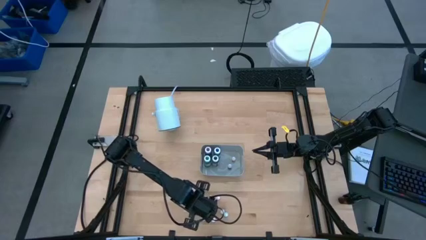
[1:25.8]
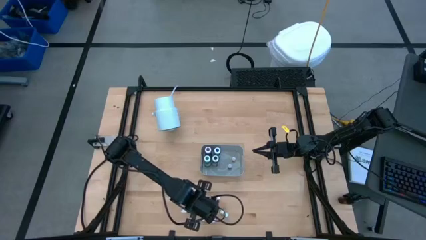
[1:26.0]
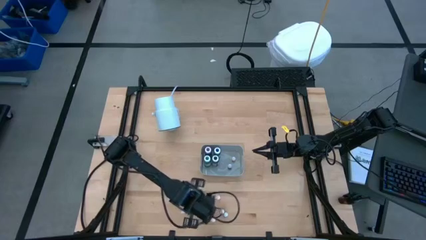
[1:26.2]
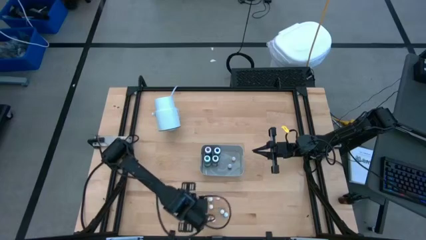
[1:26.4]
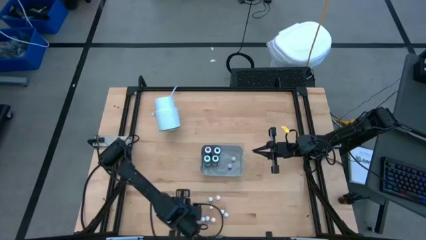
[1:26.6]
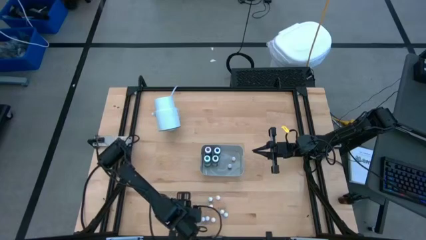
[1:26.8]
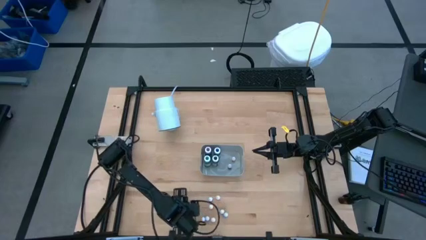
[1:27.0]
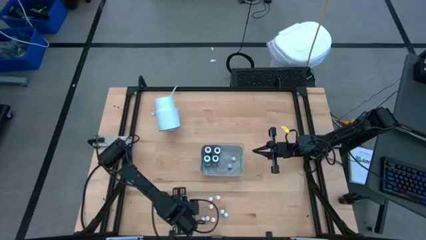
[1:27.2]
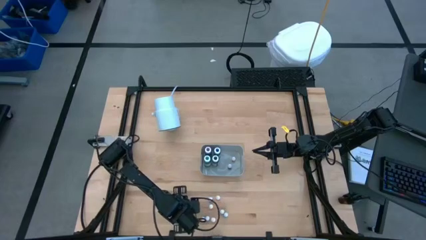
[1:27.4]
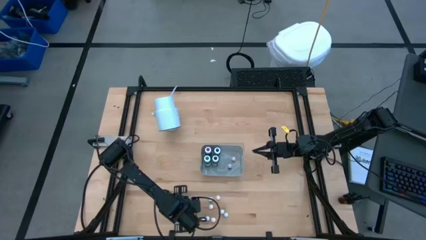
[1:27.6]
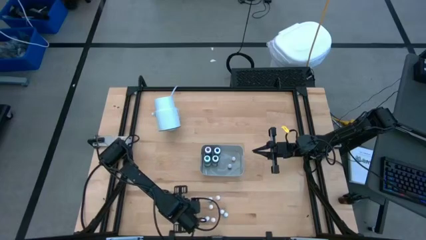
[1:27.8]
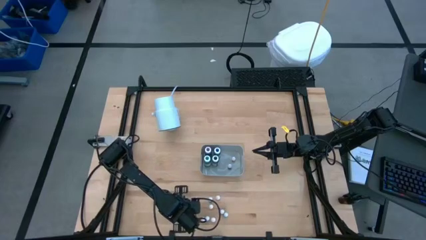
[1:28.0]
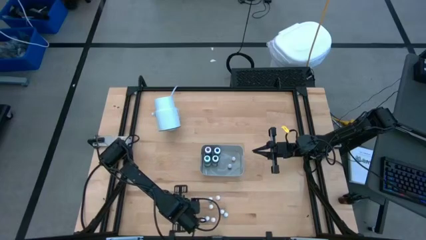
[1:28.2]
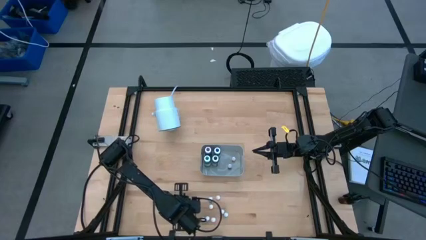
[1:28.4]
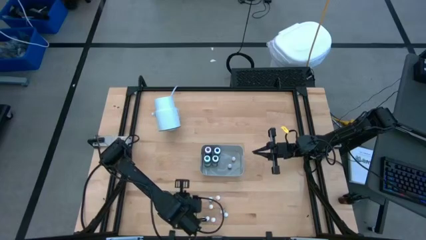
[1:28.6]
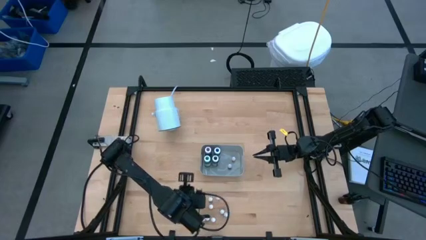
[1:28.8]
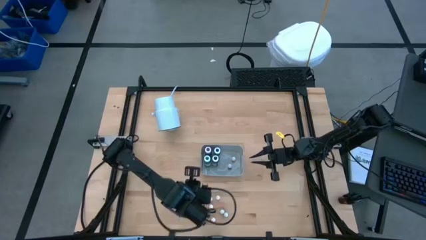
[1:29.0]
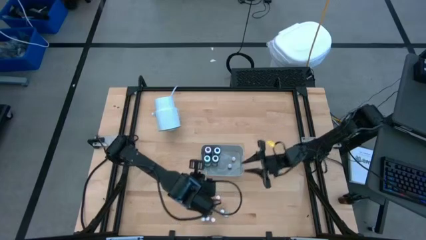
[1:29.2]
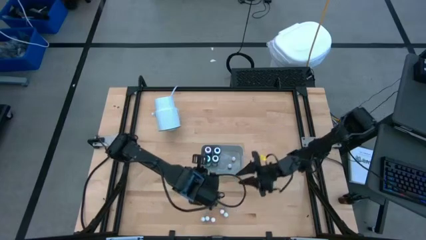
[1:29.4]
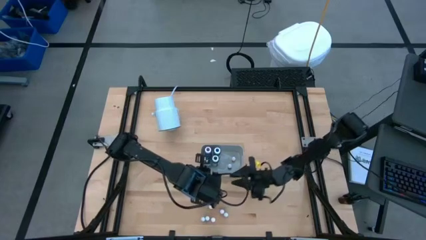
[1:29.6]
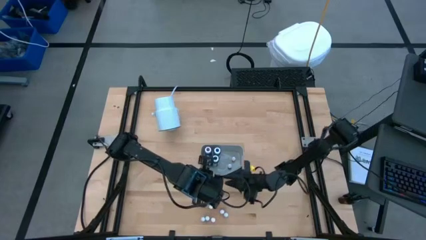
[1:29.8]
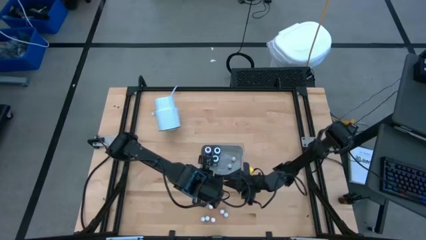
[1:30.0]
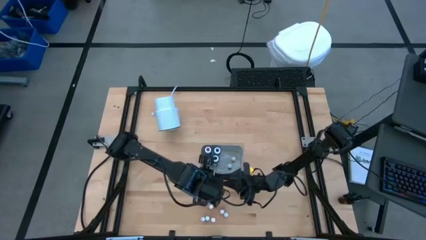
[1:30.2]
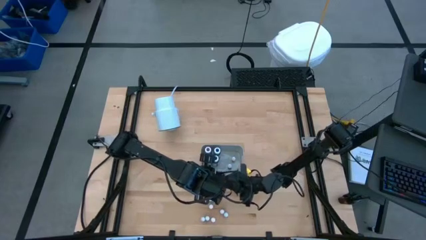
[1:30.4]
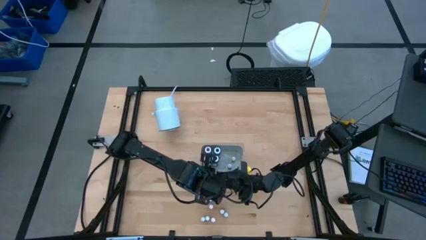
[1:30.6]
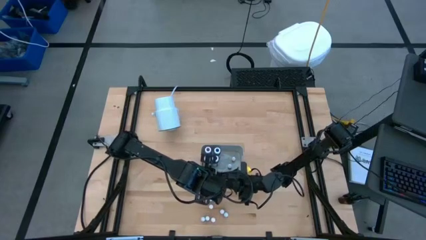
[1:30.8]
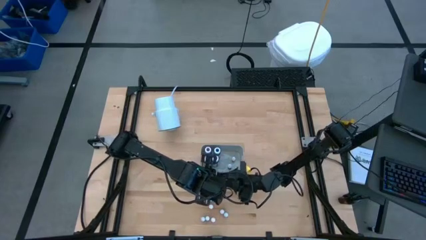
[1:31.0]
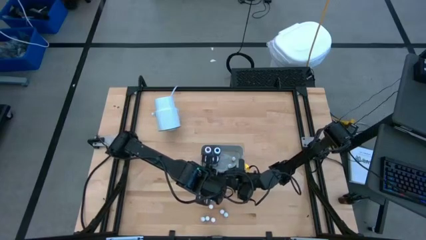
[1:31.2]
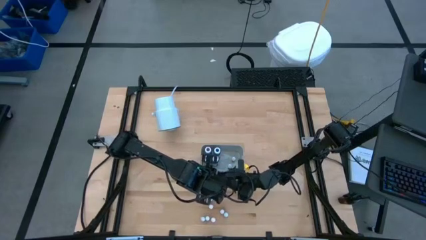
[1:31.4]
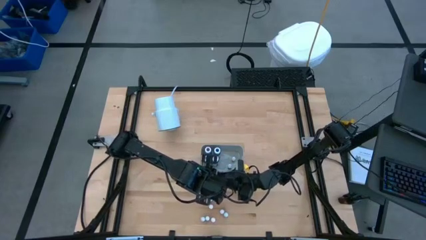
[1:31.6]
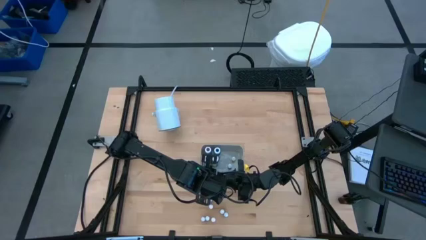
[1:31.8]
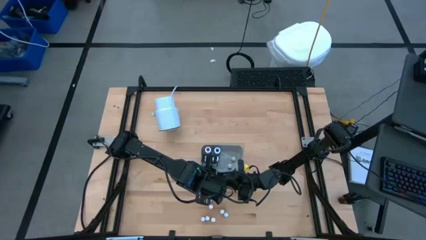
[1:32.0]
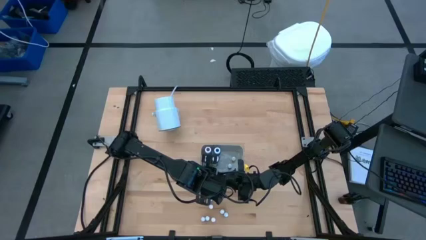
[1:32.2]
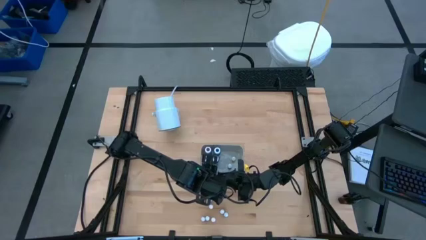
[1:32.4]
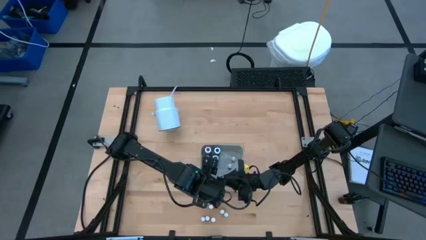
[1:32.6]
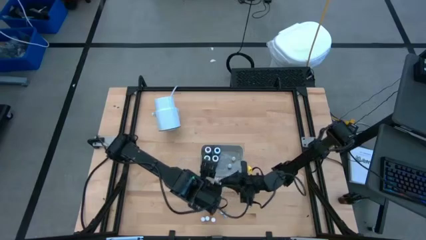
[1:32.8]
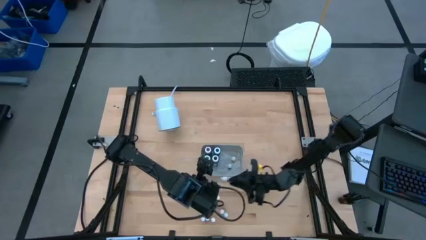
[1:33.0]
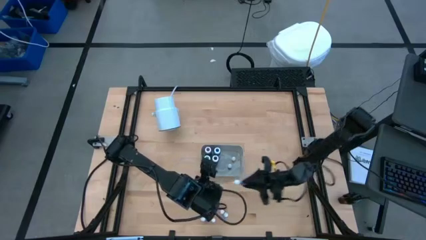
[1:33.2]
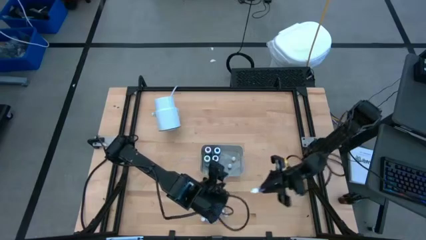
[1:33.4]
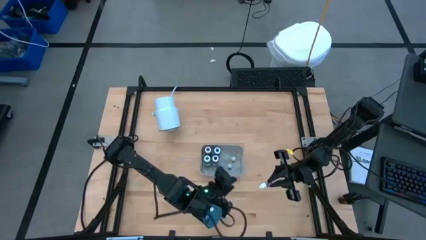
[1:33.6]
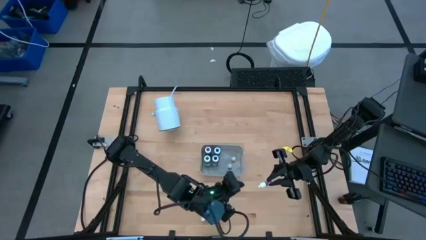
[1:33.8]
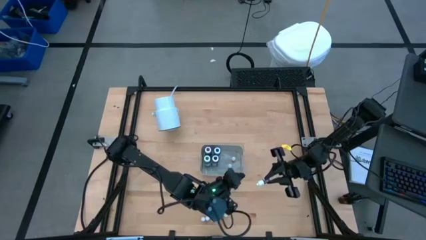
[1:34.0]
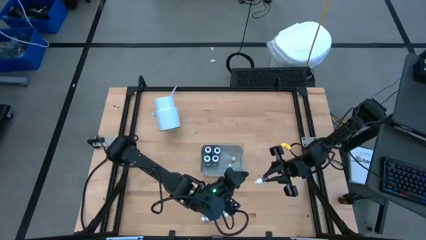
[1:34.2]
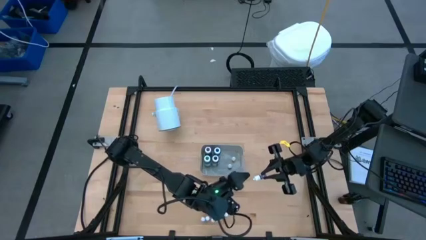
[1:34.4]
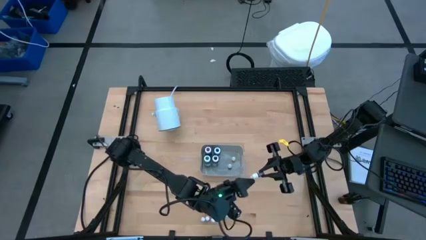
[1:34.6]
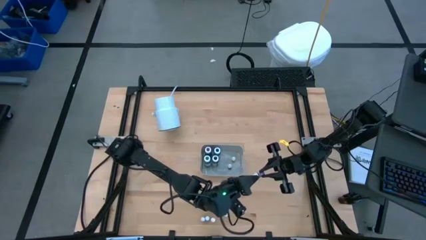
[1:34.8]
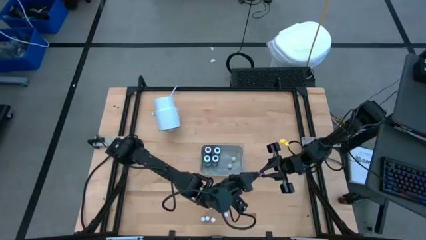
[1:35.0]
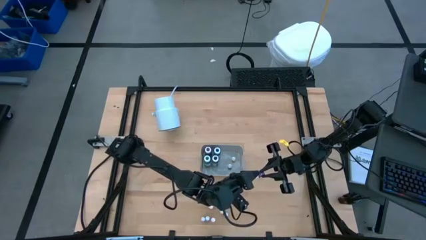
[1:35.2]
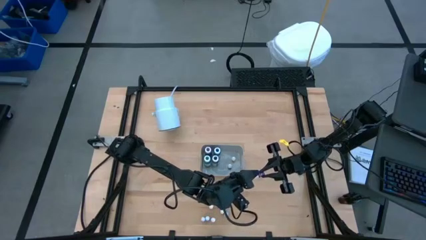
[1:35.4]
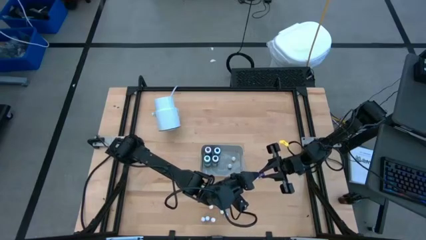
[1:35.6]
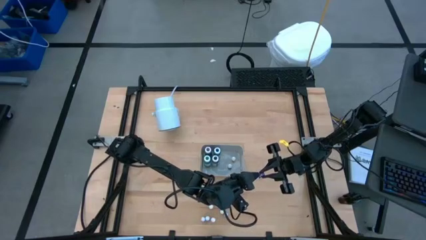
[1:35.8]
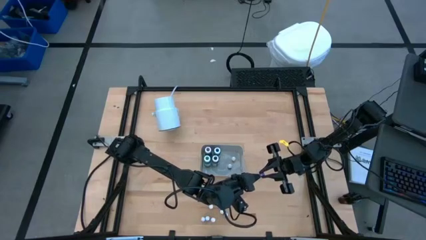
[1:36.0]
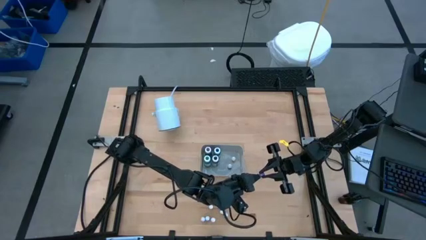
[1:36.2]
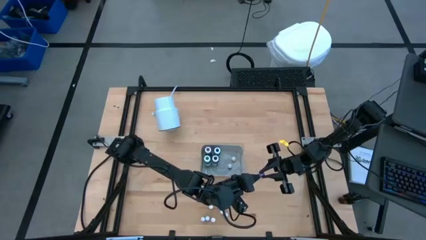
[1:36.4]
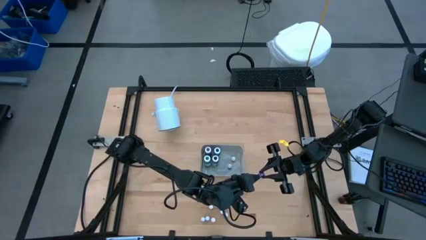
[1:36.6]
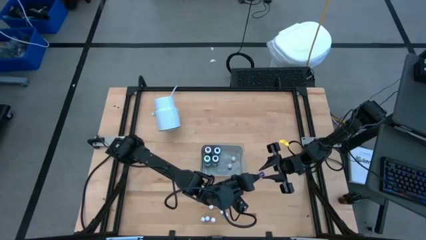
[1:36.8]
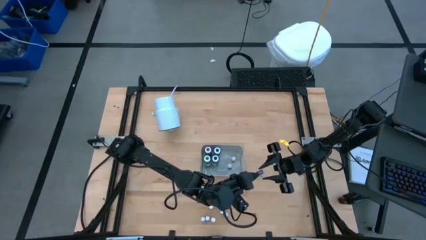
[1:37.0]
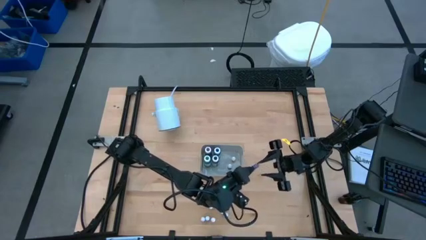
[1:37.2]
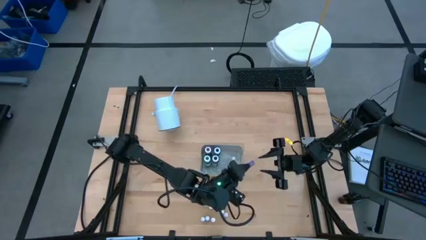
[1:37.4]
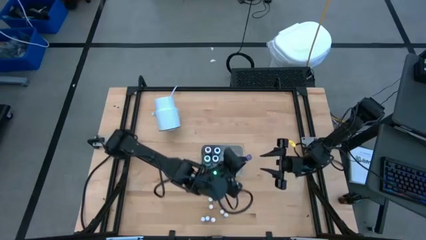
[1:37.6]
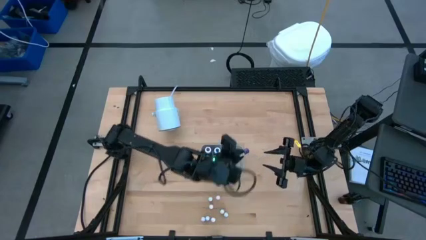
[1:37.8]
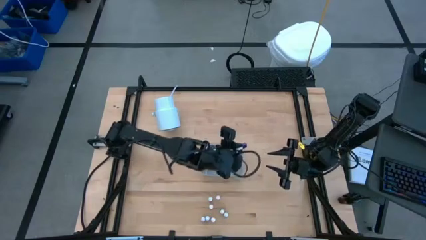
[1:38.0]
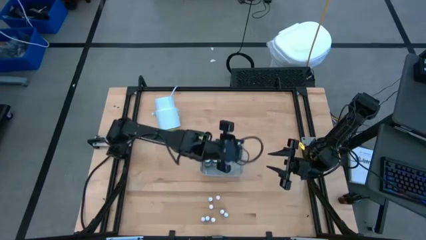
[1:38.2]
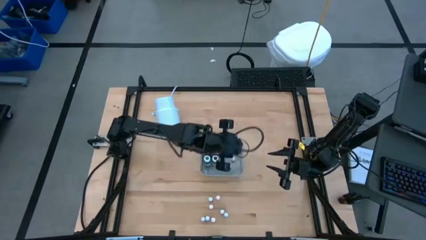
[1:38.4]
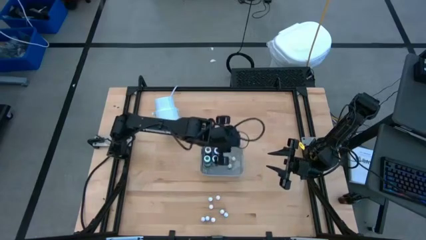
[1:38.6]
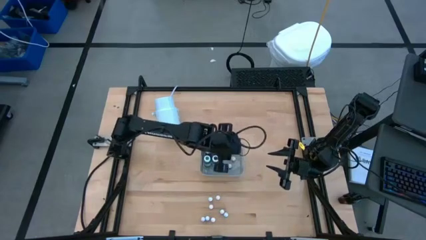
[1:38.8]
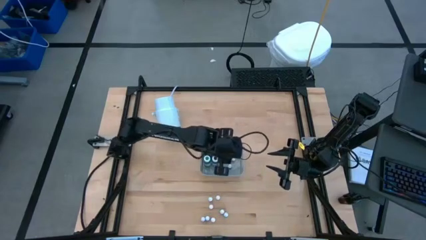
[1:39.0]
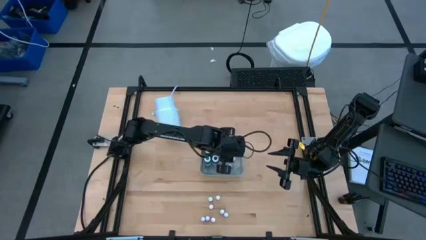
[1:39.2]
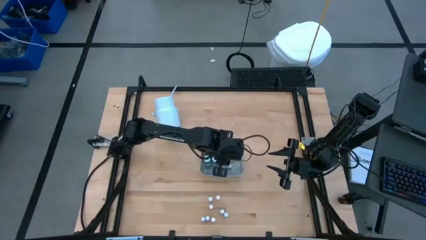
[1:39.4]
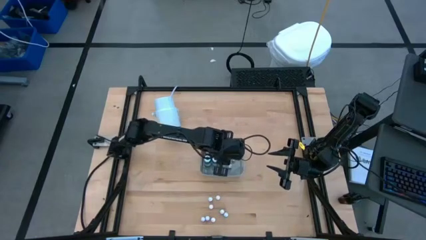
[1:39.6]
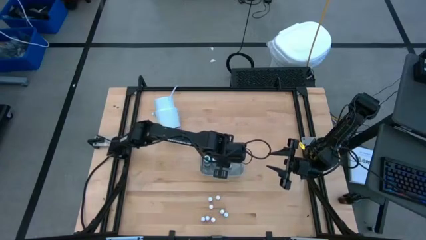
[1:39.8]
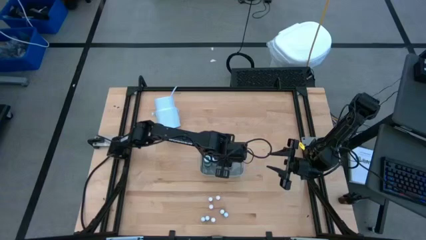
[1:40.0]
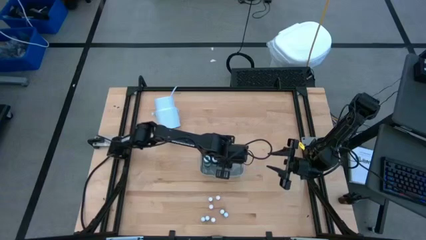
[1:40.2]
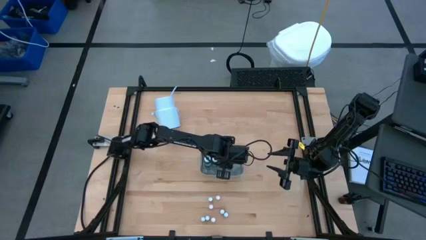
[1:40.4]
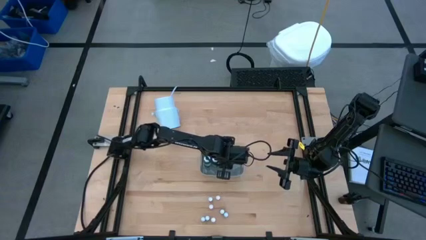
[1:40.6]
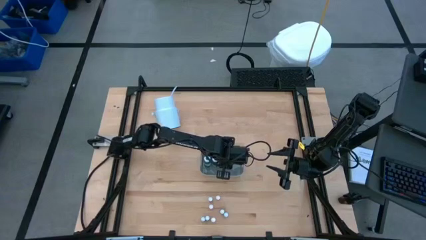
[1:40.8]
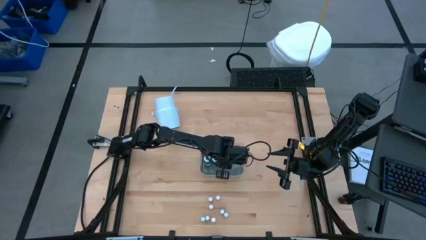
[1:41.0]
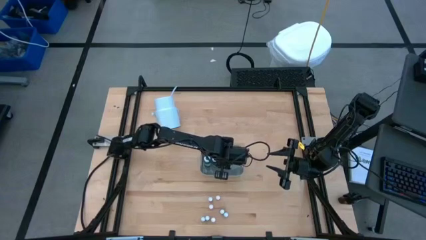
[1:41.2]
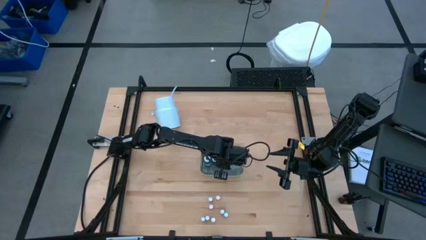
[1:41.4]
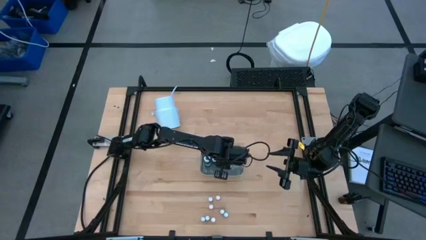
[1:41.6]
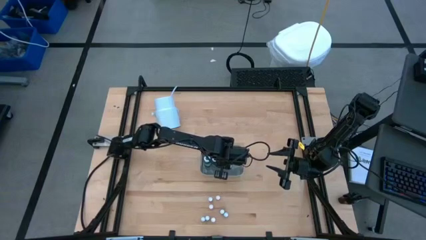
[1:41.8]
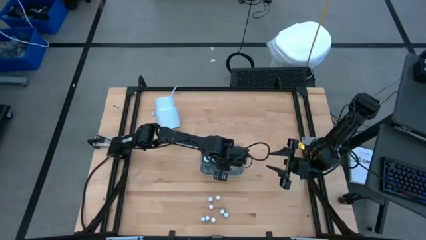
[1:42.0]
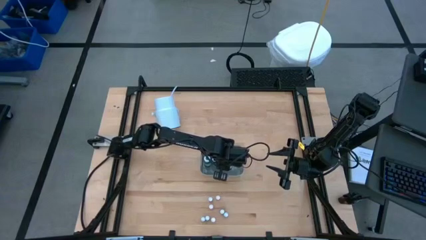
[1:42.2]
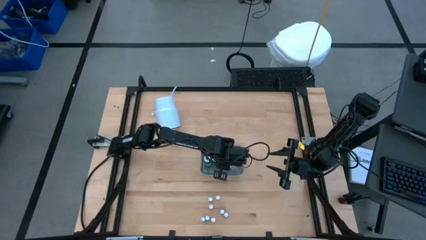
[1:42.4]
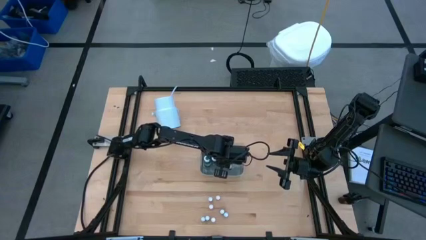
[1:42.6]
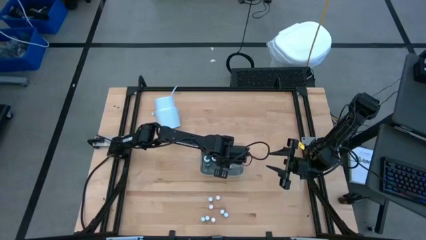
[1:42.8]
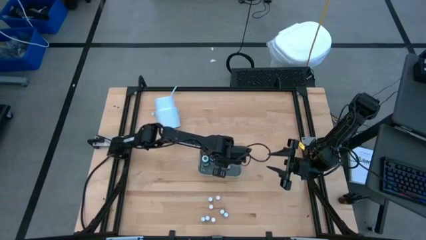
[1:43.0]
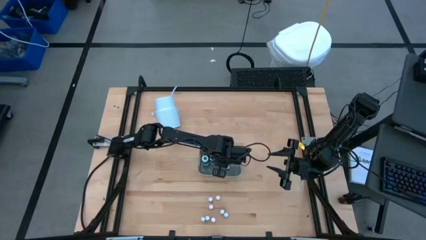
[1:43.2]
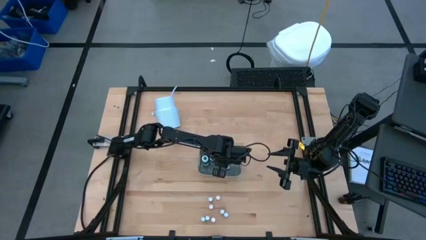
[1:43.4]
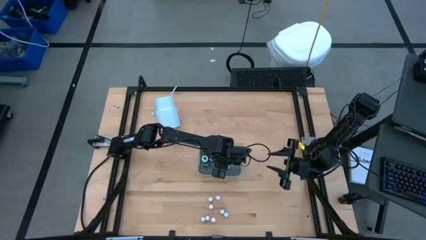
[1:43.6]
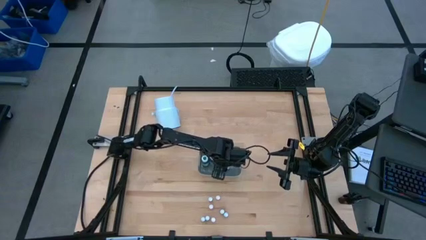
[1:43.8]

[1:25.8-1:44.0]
Task: Pick & Place food coloring
Put the left small purple food coloring bottle into the bin
